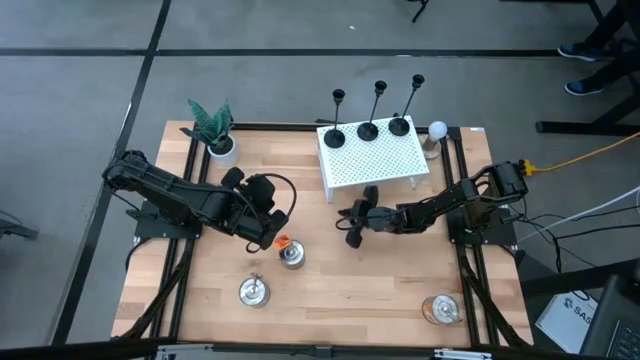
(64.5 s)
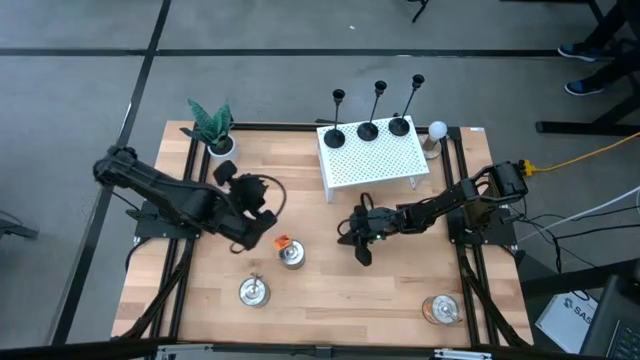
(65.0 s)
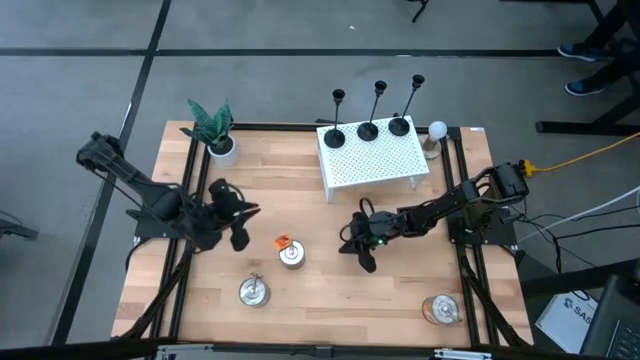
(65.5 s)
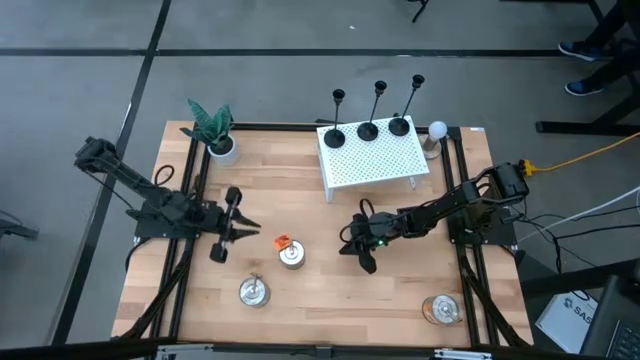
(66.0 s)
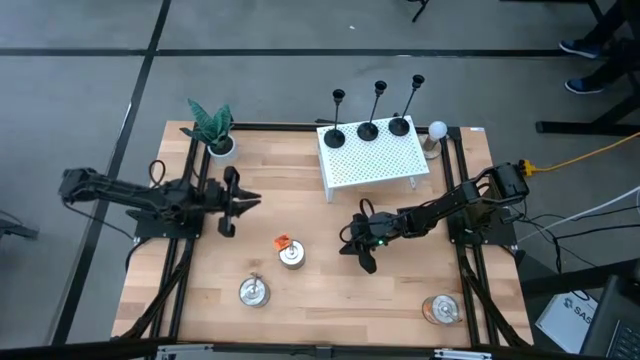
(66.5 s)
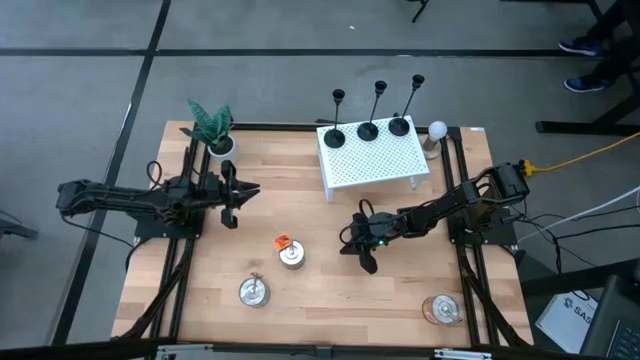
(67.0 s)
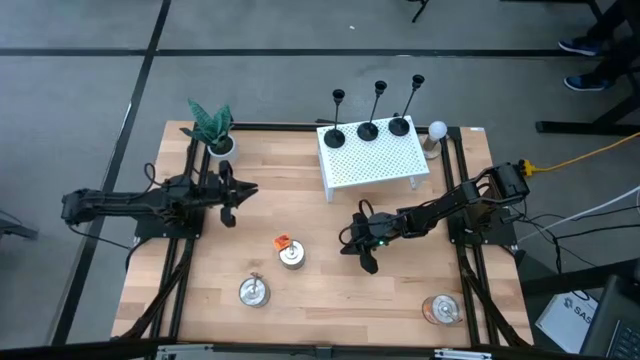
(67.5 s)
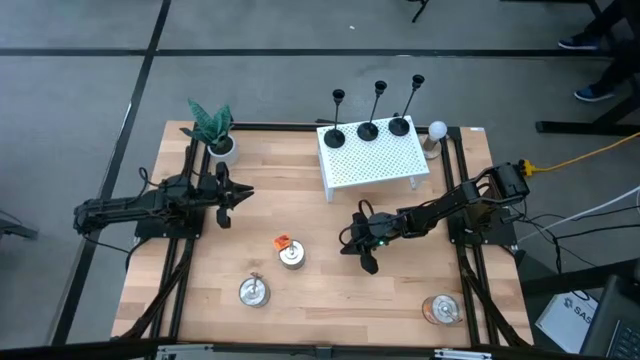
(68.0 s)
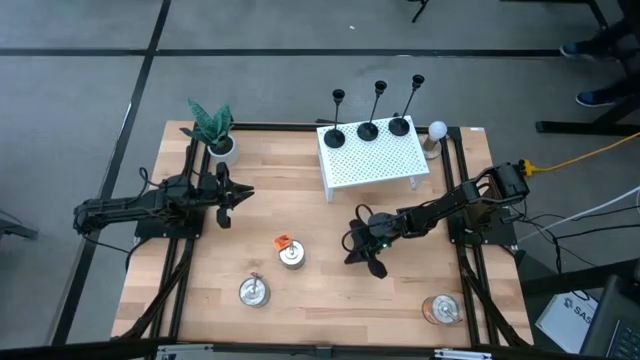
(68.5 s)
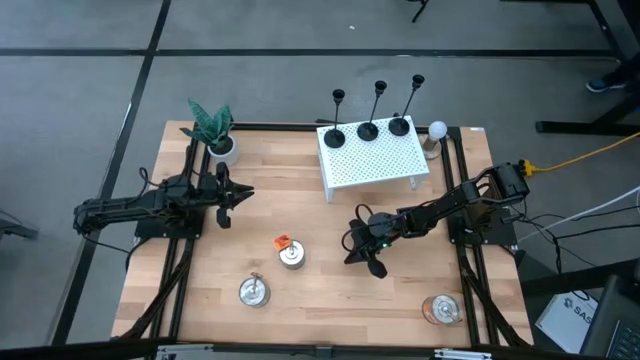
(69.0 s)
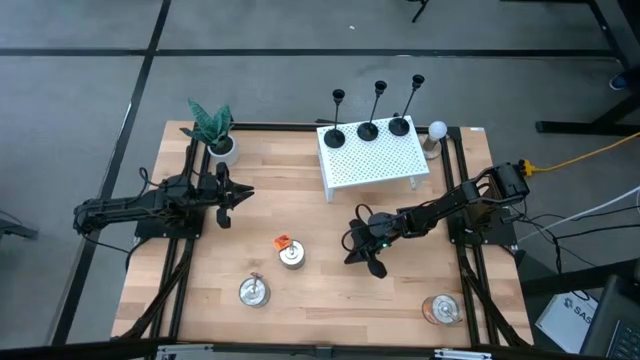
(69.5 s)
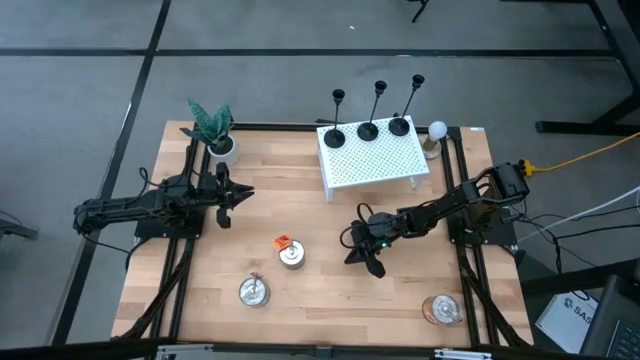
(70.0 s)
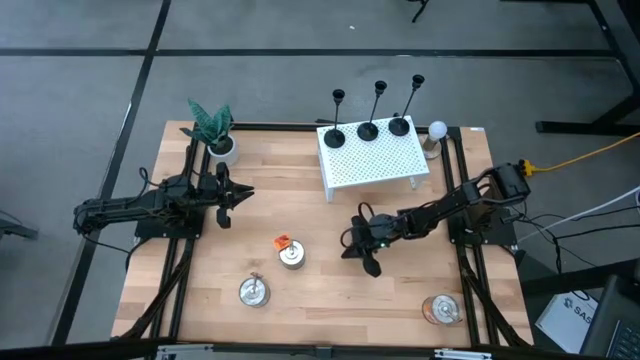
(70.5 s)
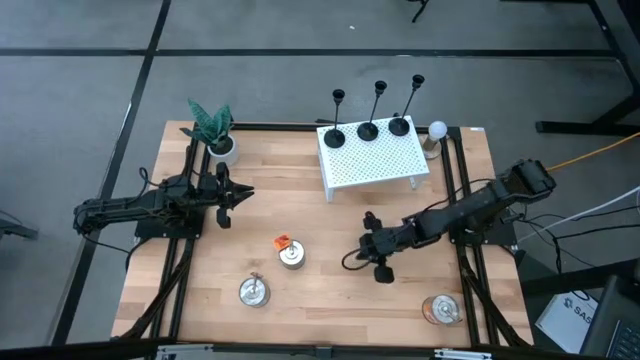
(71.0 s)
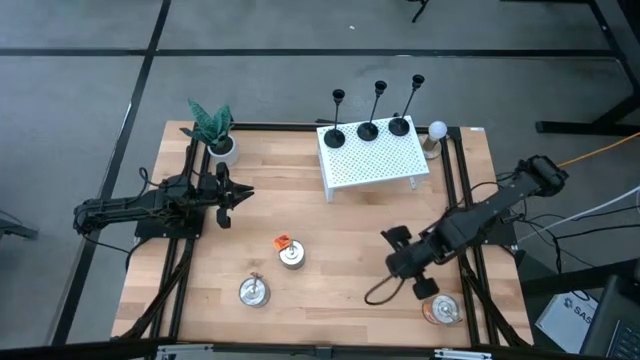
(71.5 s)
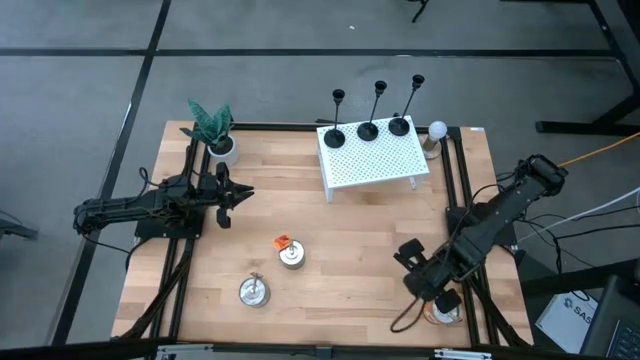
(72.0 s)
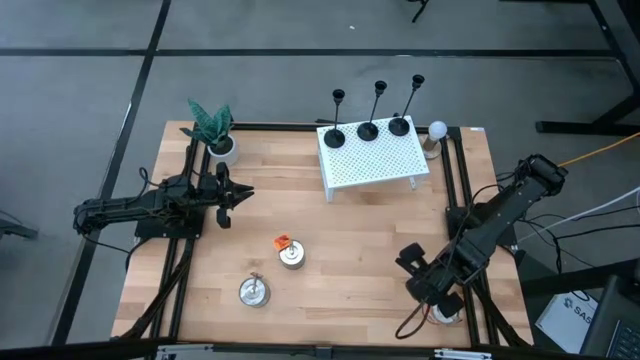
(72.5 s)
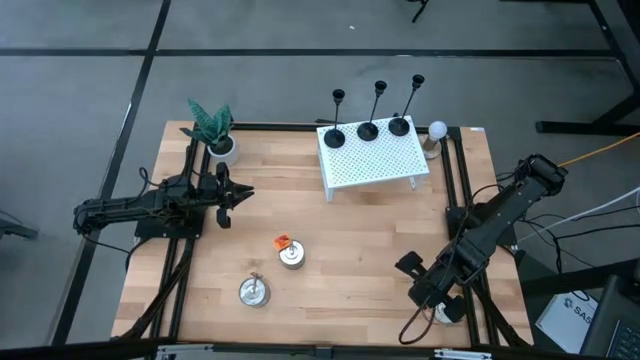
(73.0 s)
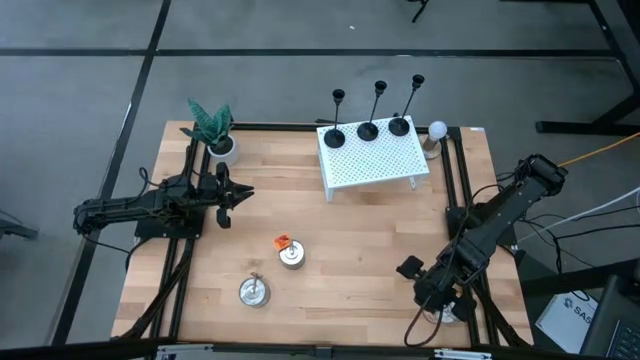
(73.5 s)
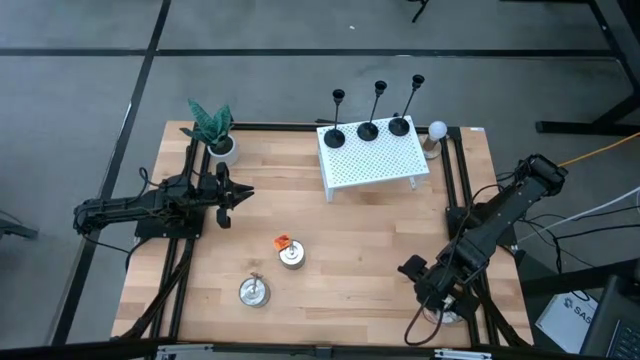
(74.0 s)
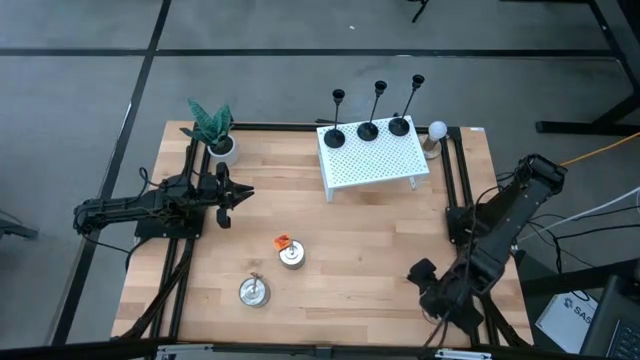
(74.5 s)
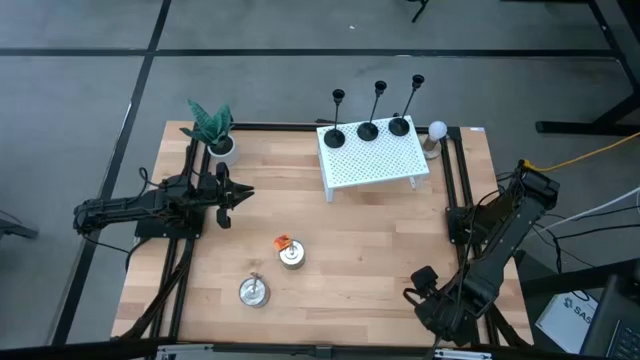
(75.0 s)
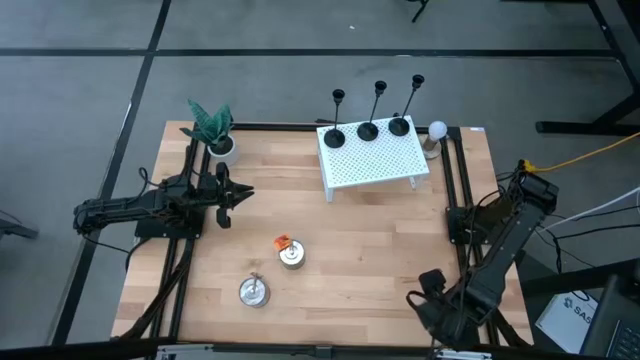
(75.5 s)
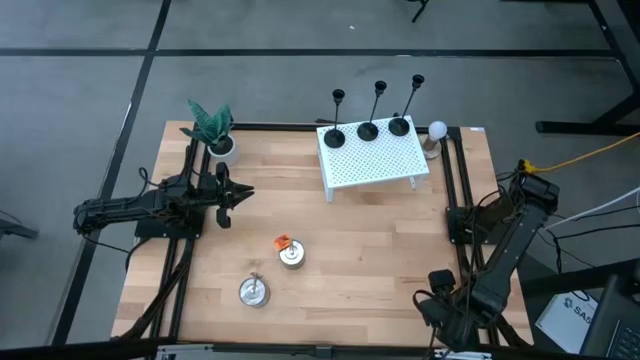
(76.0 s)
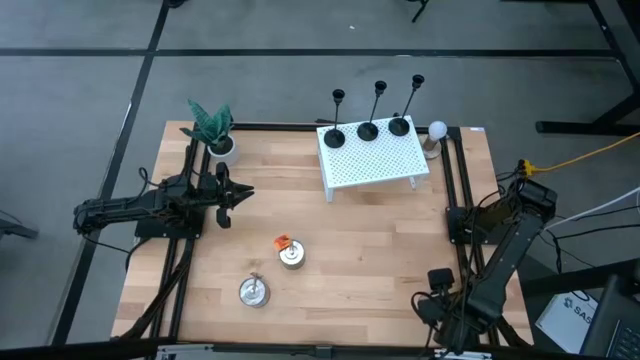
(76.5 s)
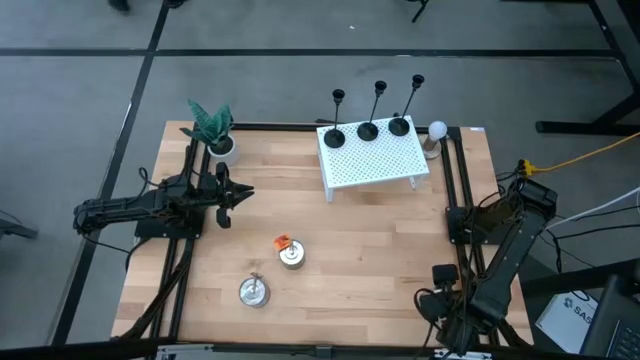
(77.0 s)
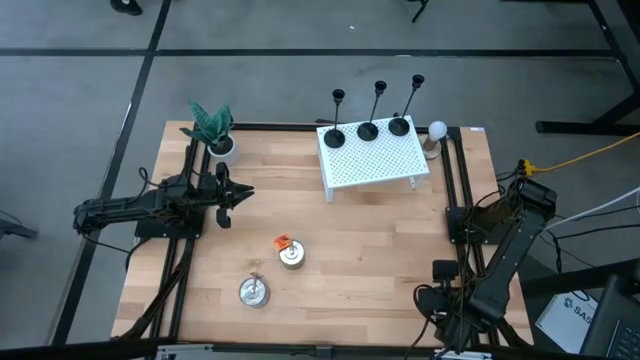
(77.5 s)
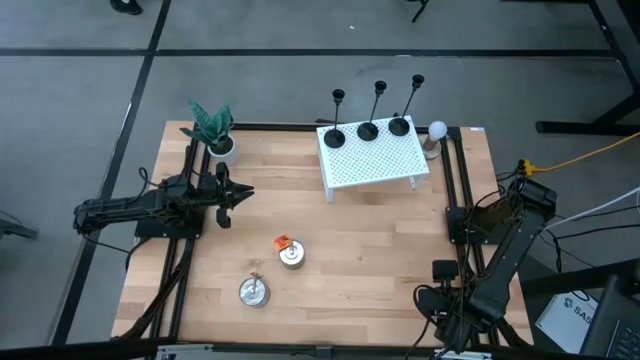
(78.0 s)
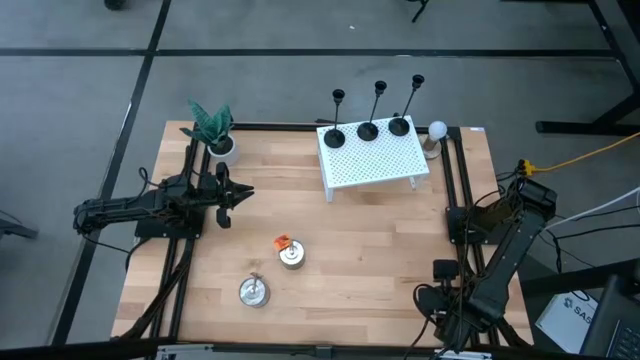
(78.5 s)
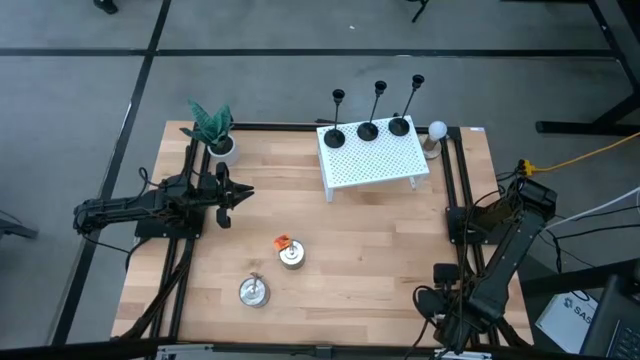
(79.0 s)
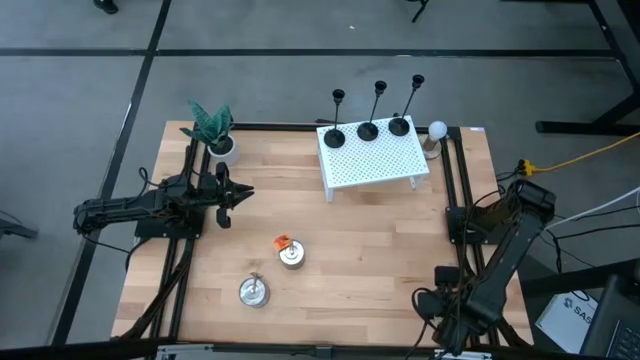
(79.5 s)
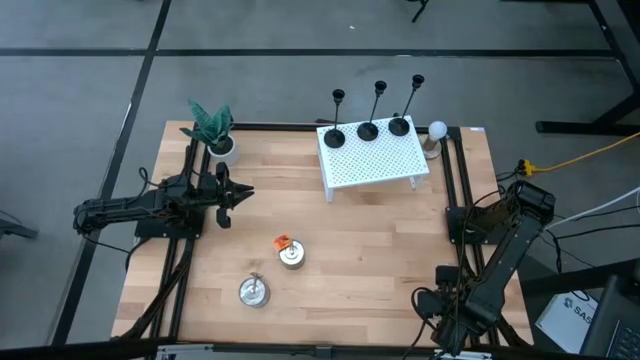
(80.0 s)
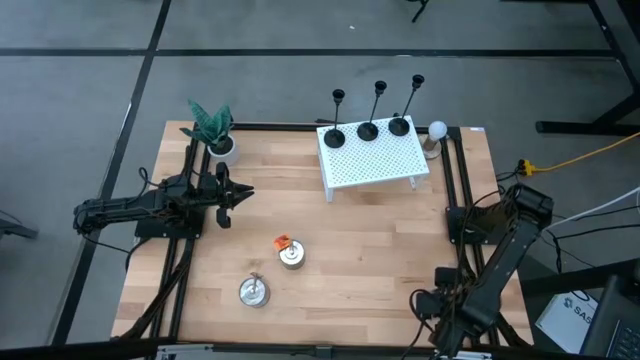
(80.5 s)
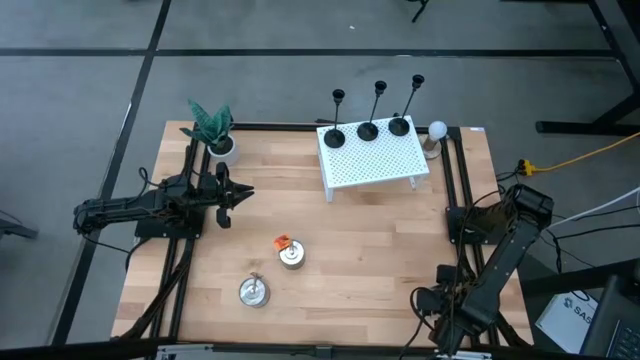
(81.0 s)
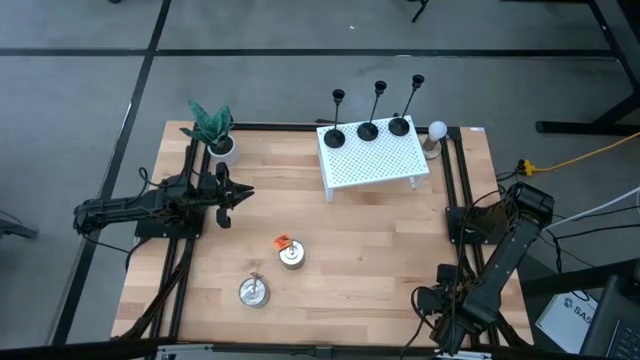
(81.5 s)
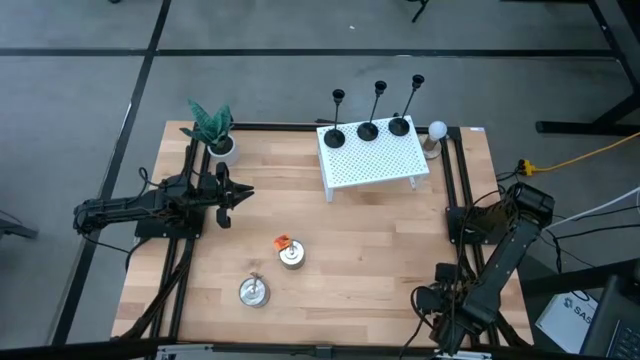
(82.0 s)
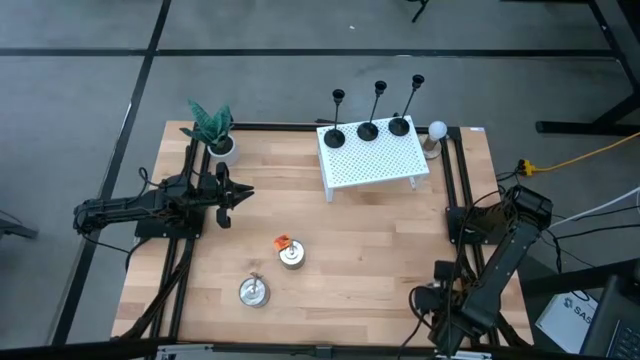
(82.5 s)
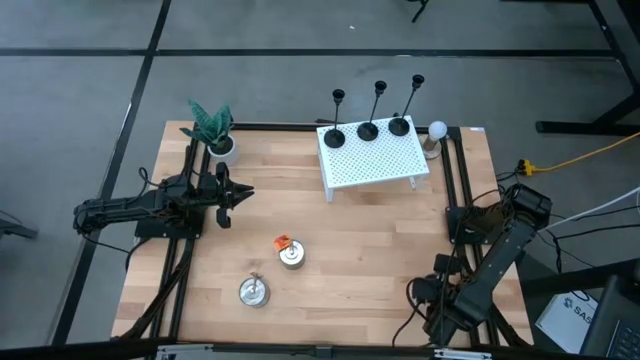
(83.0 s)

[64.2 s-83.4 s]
Task: Pick & Place candle stick holders
Put the bottom orange scented candle on the shelf

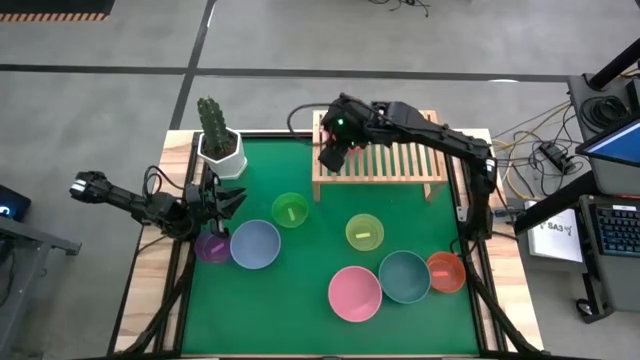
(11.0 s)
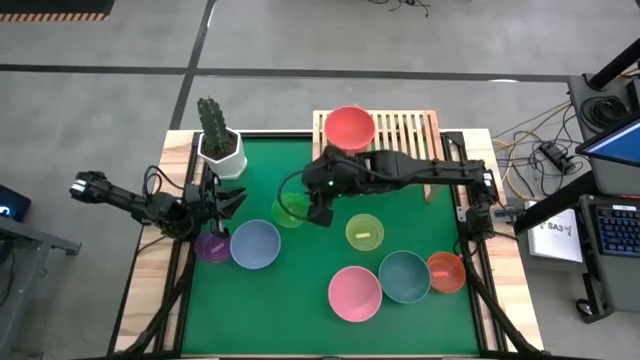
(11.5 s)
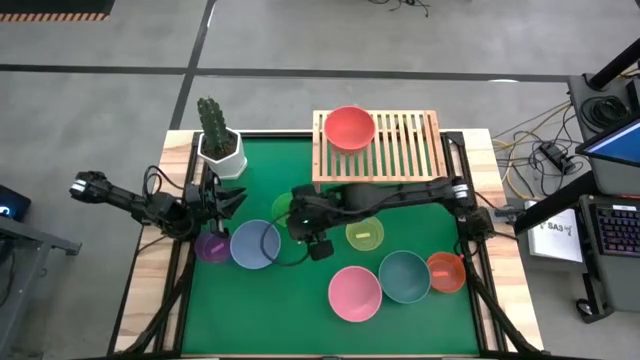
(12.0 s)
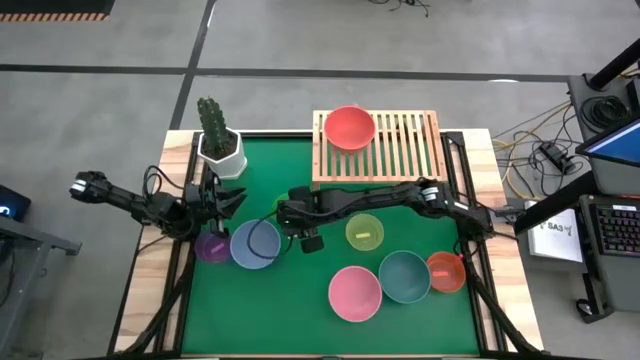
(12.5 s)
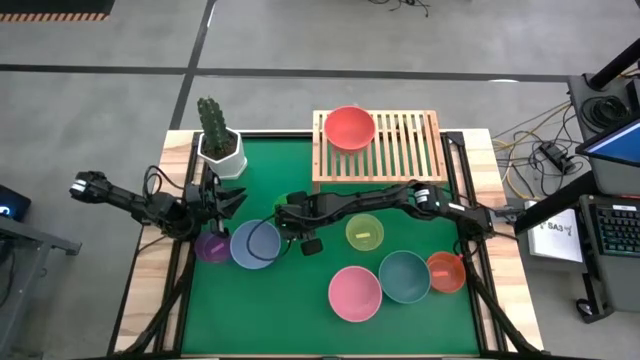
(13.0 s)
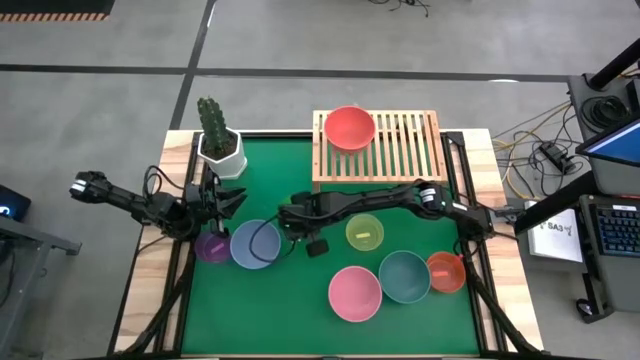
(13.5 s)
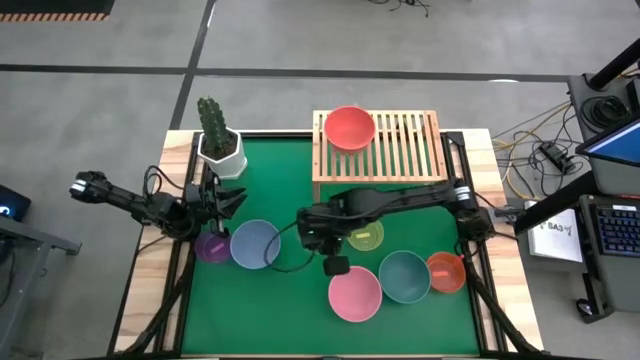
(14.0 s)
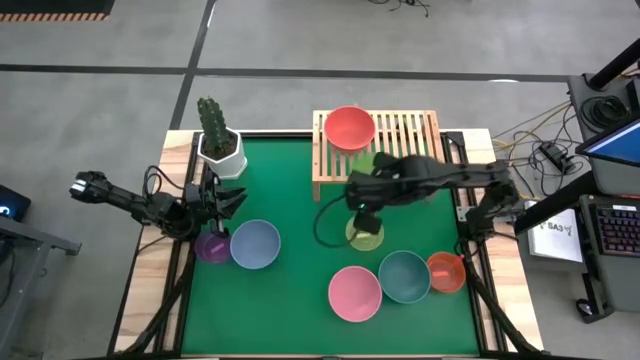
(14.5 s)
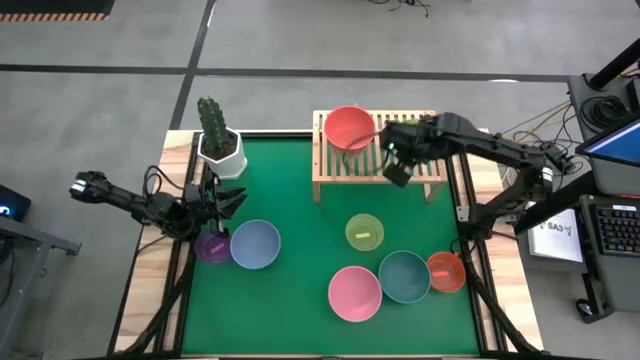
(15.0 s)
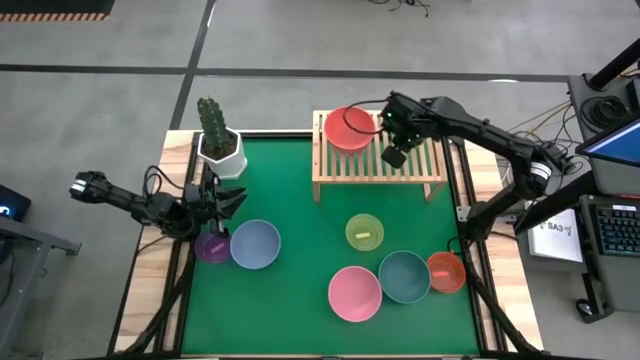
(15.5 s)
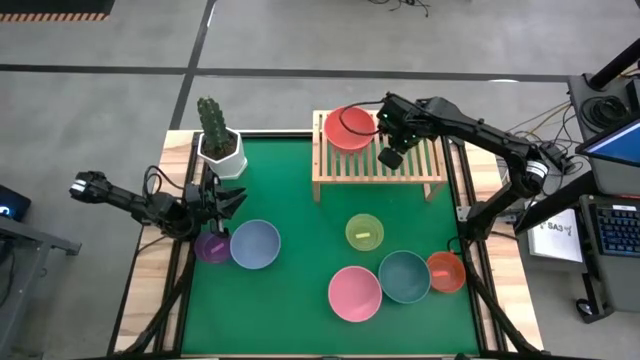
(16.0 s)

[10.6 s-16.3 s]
Task: Place and stack bowls onto a shelf
Put the light green bowl on the shelf
